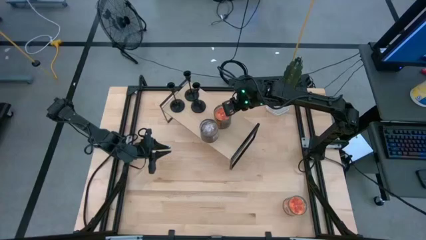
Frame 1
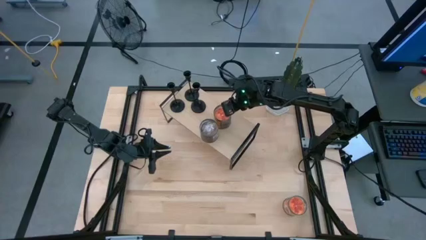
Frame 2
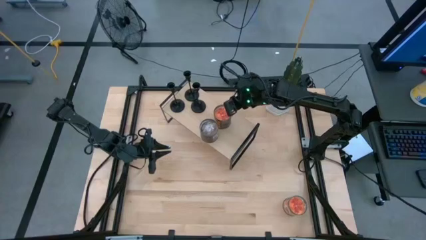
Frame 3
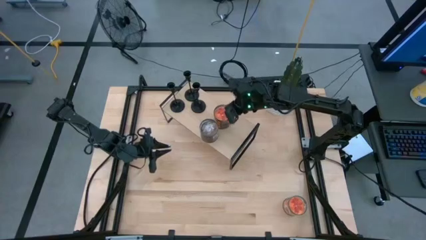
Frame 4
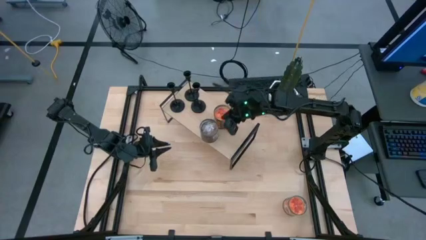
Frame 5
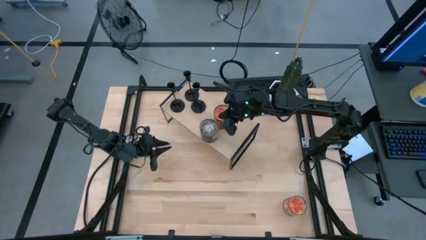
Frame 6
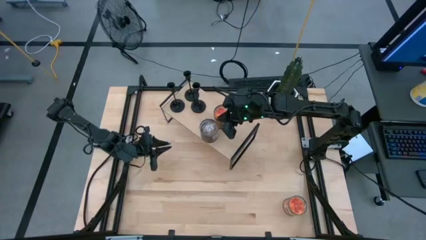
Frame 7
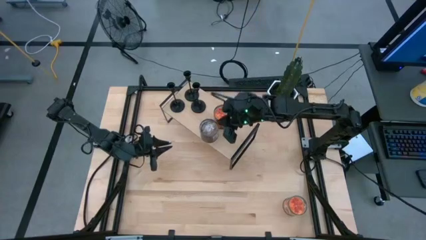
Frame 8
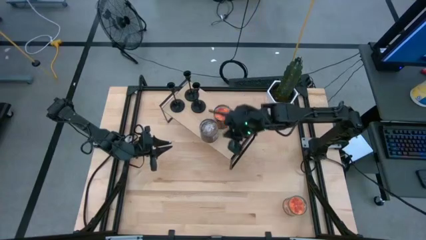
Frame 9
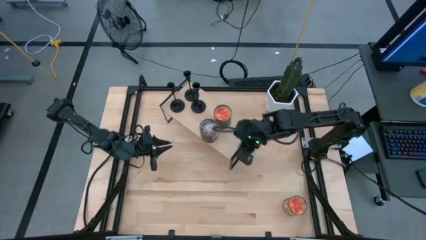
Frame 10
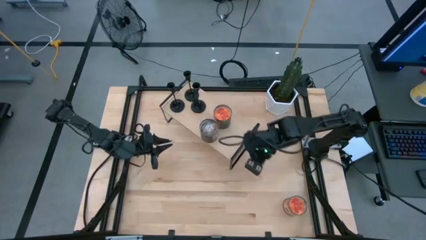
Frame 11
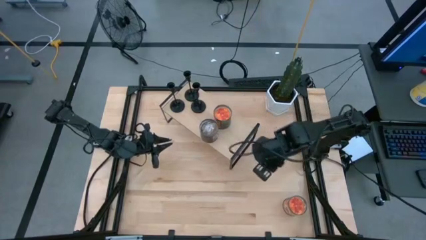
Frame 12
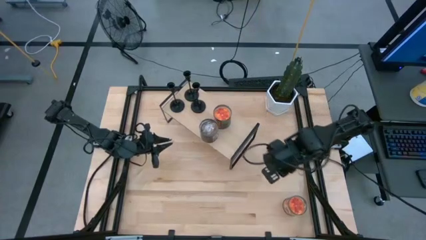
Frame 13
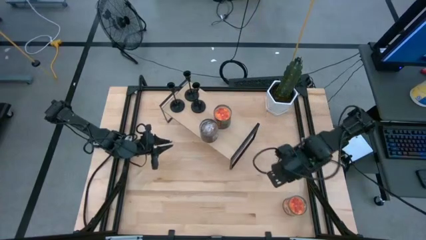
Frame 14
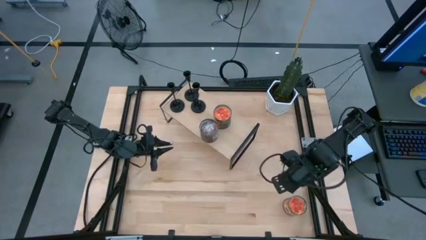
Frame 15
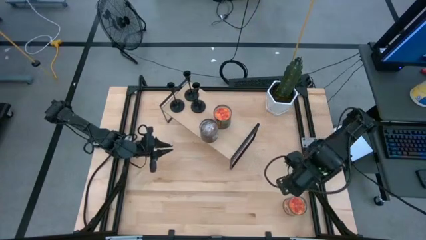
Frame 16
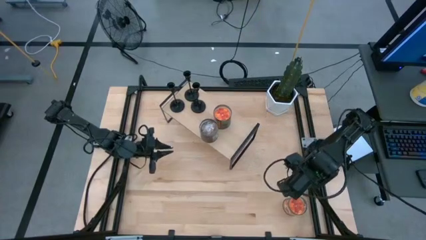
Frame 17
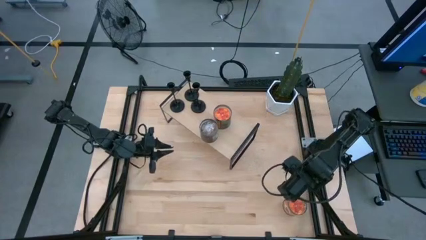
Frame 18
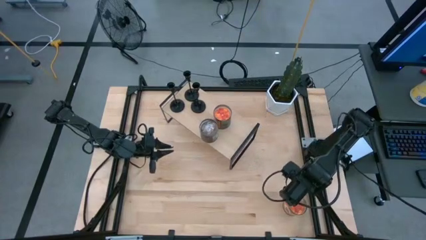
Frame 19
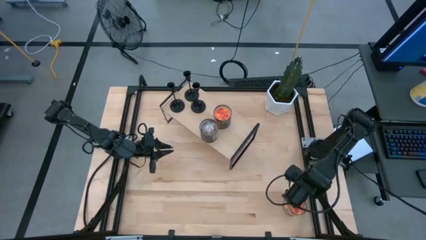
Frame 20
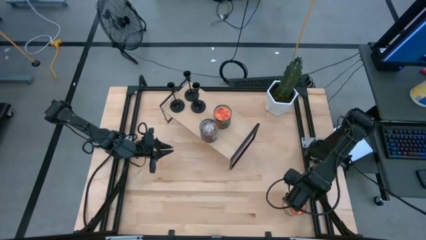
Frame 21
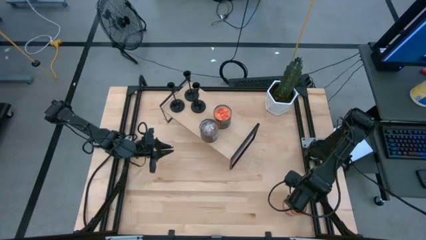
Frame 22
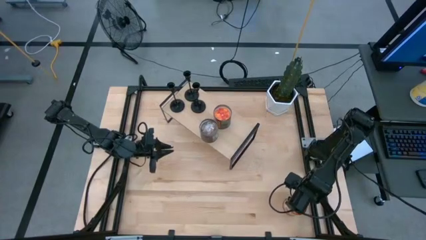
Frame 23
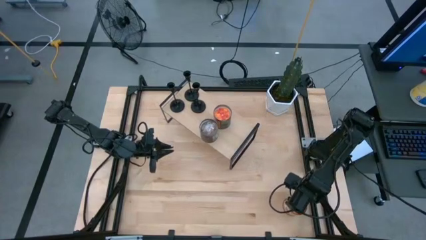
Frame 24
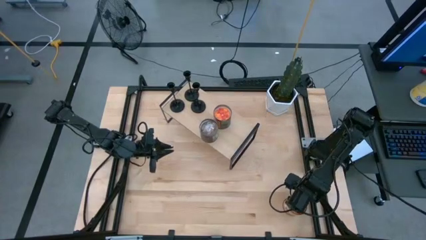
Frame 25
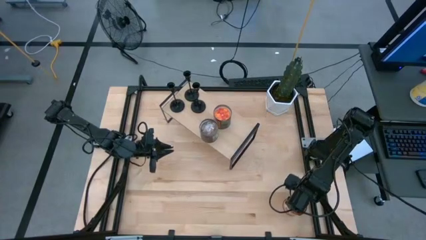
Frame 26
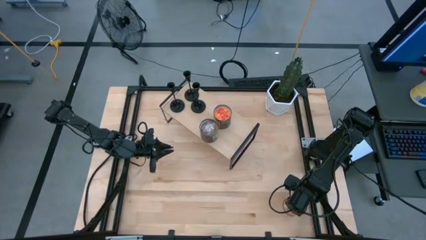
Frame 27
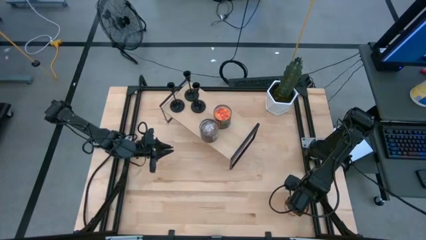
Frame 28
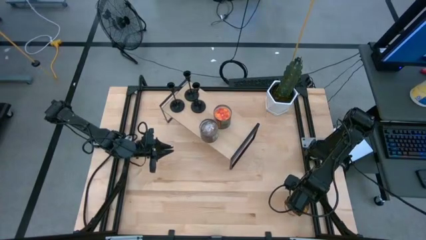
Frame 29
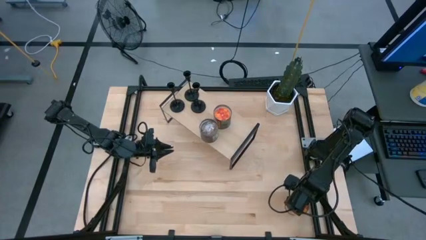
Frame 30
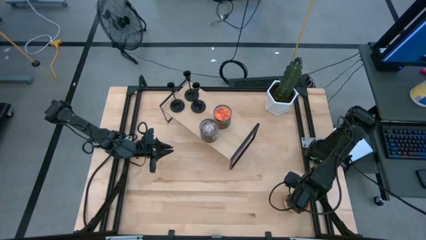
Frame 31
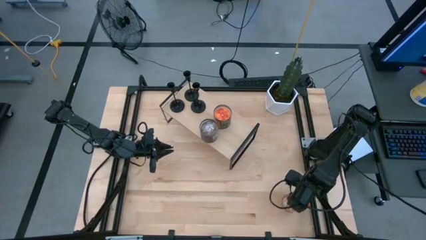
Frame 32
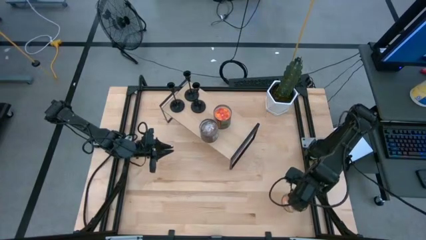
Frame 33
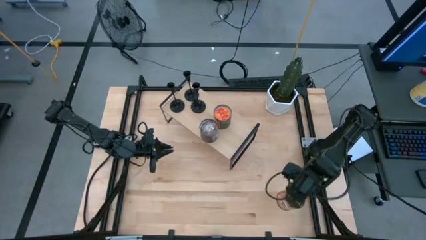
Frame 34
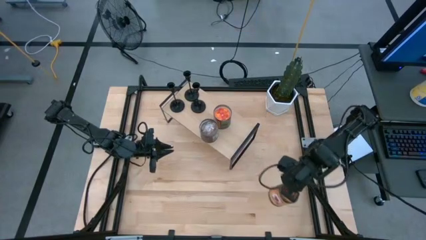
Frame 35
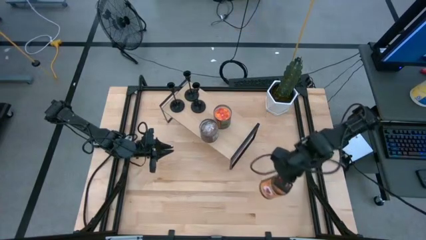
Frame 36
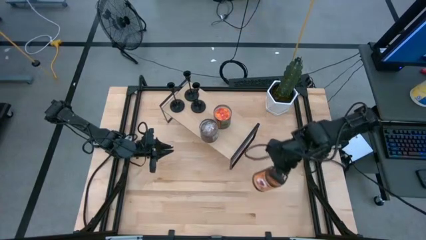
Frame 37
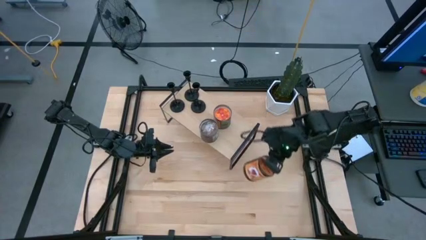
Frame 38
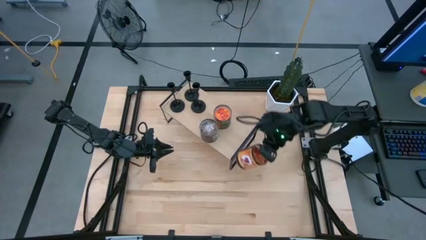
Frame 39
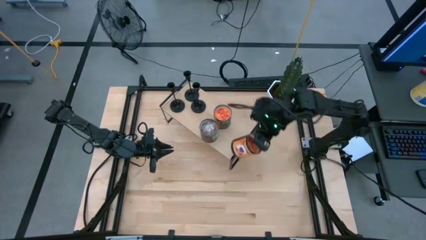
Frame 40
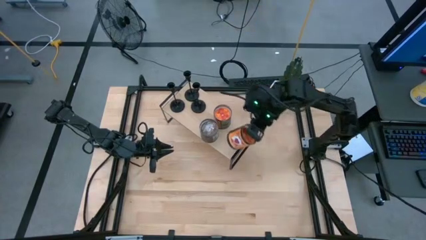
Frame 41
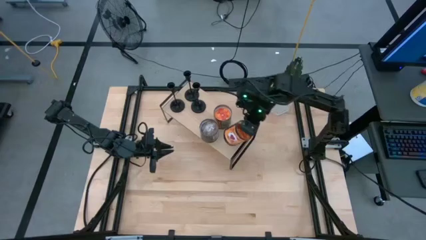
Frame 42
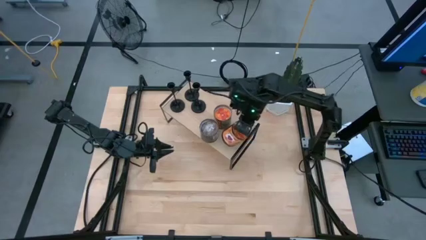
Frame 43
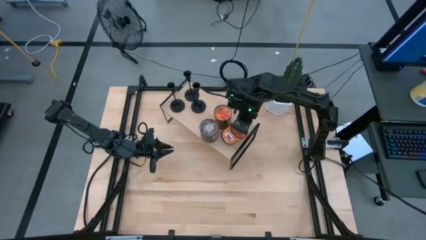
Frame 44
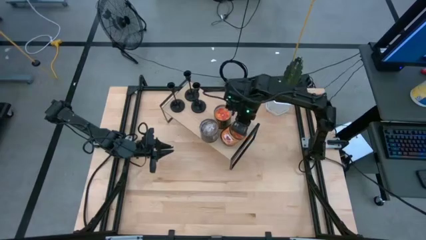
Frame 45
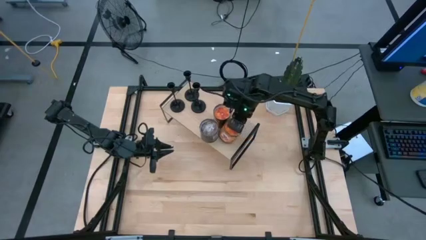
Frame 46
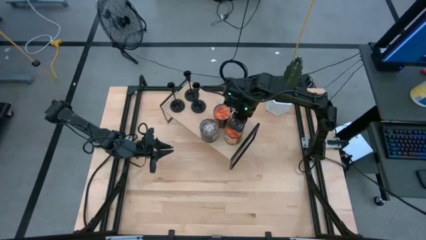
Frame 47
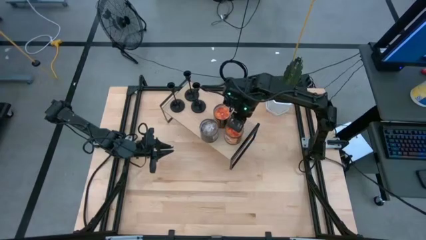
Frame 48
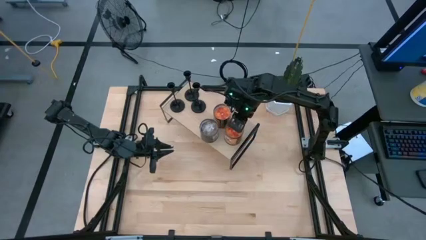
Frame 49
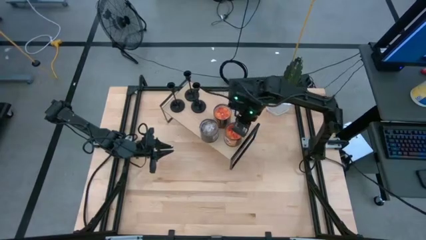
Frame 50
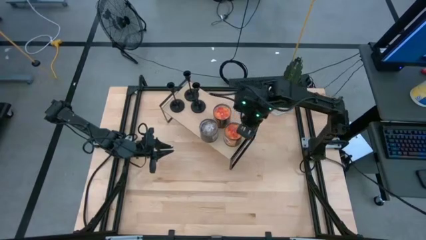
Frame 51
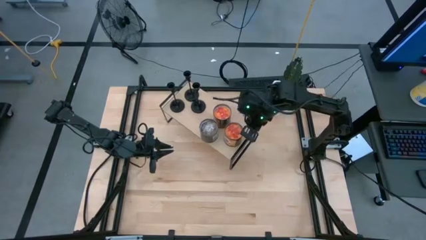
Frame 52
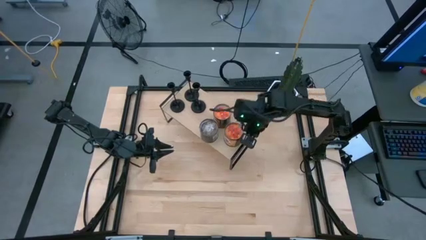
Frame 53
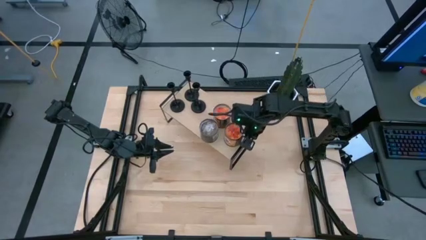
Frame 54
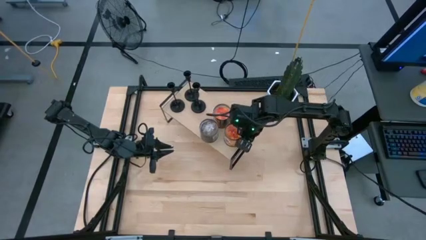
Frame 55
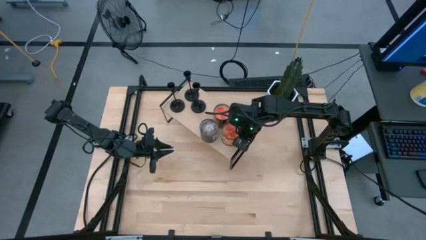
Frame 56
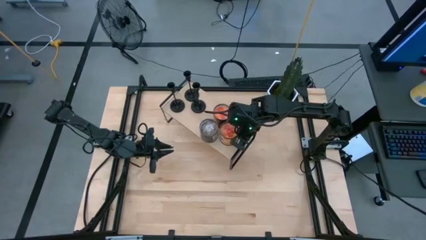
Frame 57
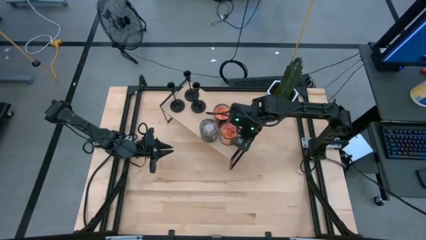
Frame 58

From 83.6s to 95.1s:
Task: Pick & Place candle stick holders
Put the orange scented candle on the shelf

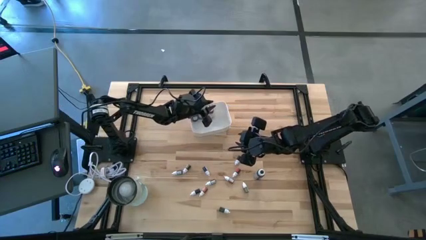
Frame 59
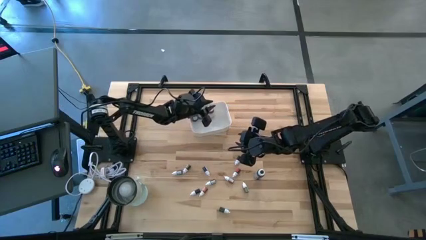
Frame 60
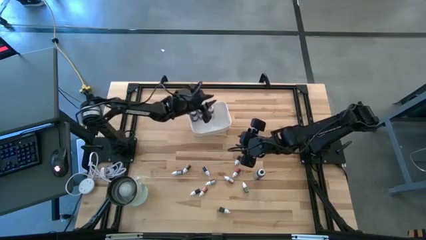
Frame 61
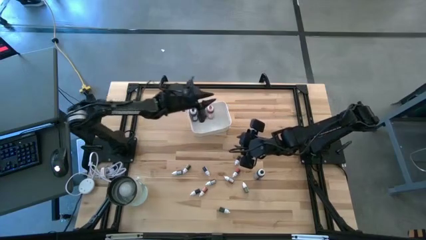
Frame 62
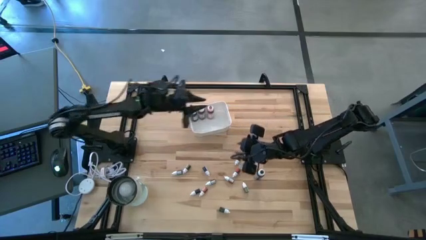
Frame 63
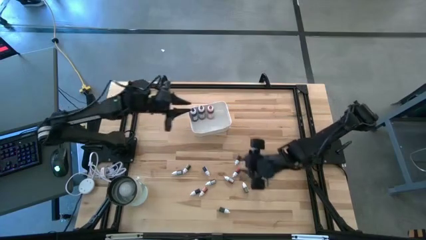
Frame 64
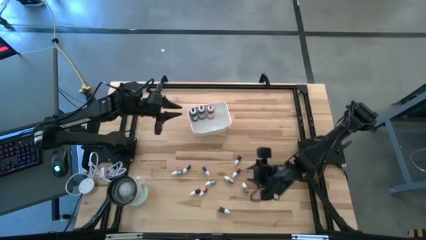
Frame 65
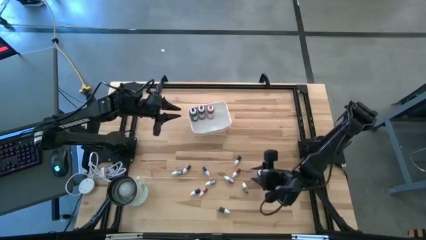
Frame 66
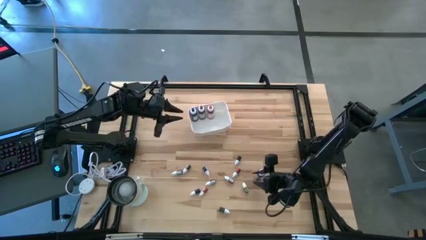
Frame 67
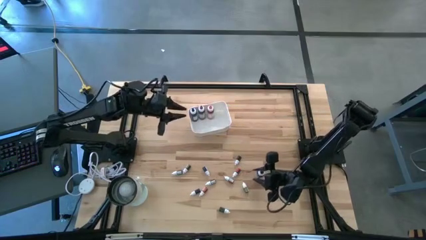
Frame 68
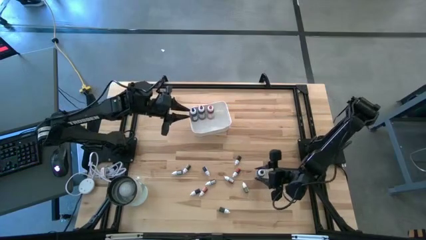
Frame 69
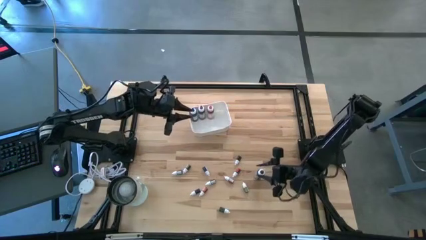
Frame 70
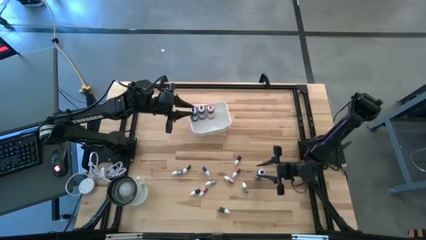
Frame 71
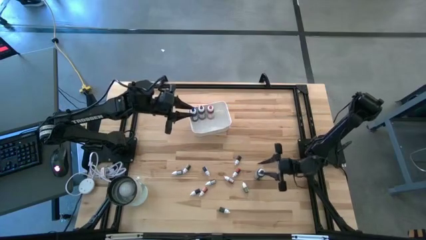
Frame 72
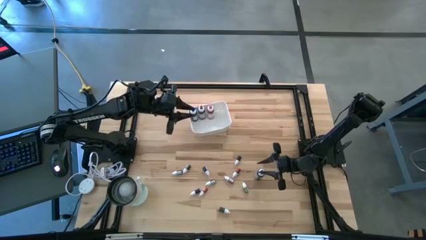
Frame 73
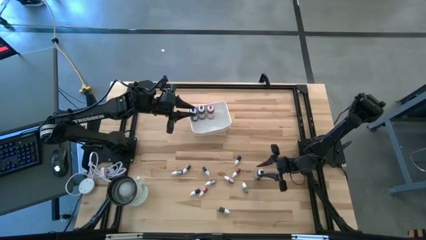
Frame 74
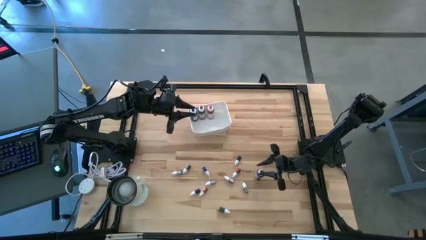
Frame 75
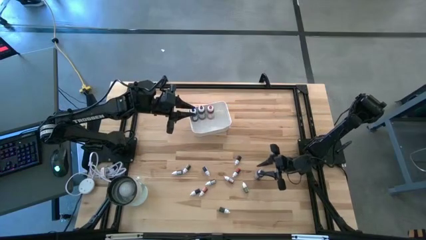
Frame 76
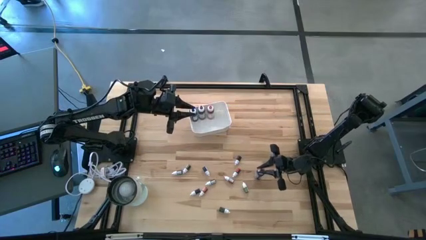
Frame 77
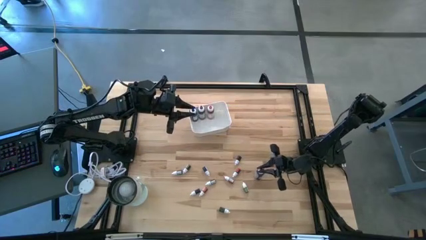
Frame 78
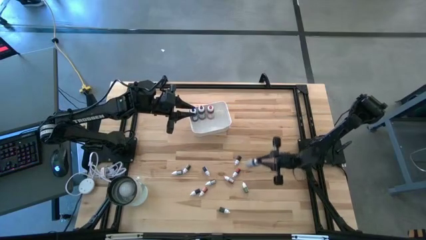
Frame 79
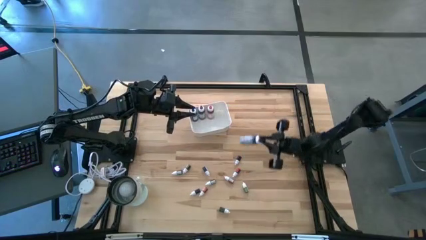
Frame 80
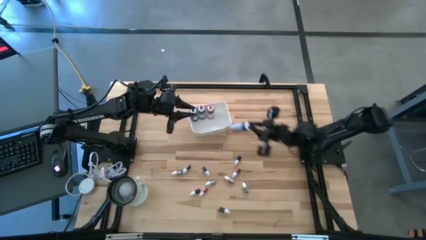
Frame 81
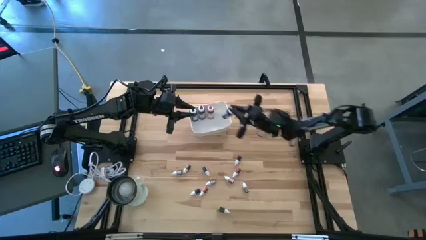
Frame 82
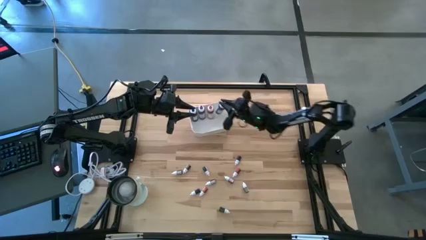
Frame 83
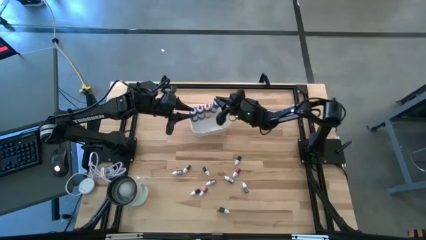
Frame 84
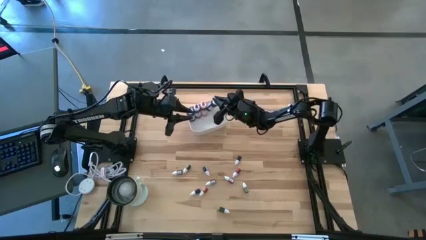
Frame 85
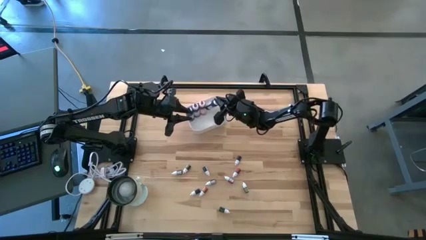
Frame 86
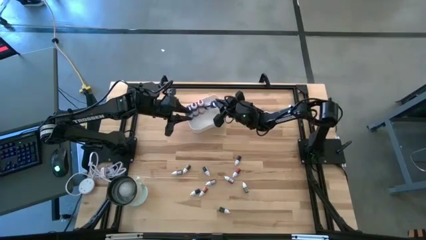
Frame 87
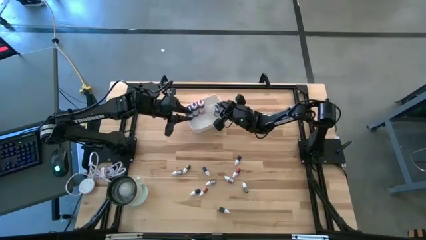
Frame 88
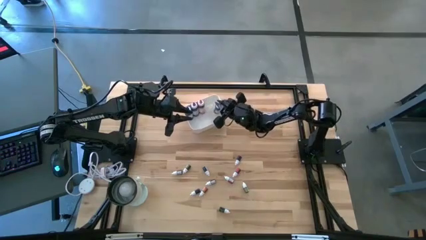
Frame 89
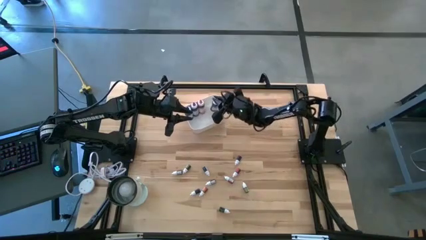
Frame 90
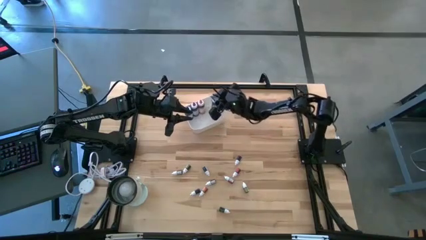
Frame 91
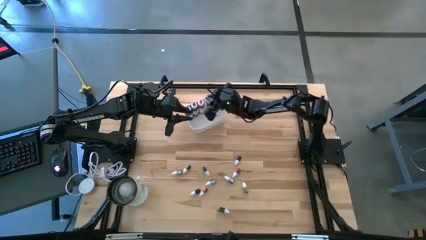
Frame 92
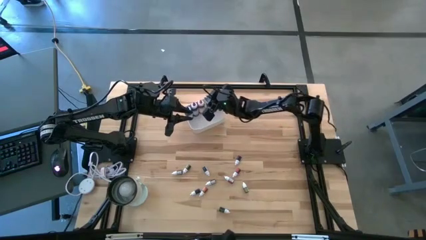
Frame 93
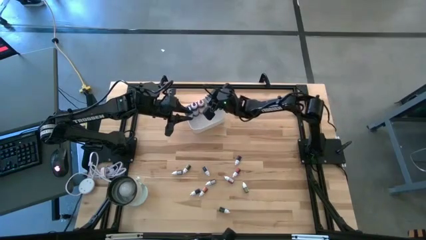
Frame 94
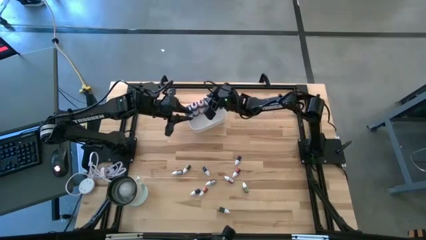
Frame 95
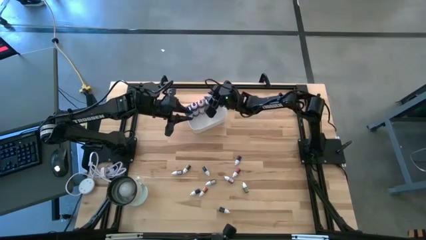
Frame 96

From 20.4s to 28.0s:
Task: Pick & Place food coloring
Put the large black food coloring bottle into the white bin
